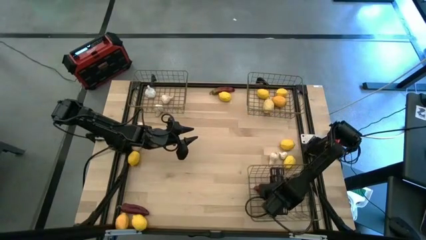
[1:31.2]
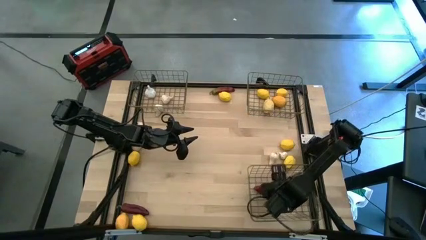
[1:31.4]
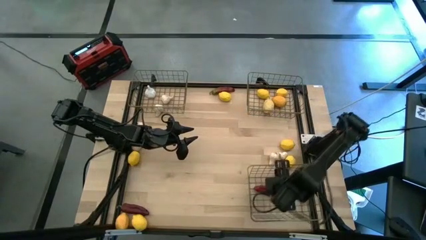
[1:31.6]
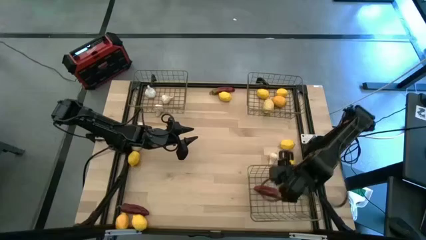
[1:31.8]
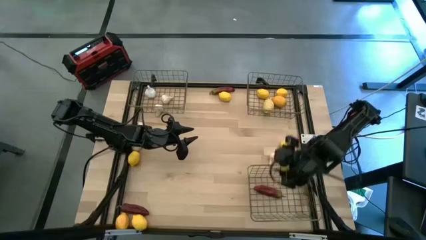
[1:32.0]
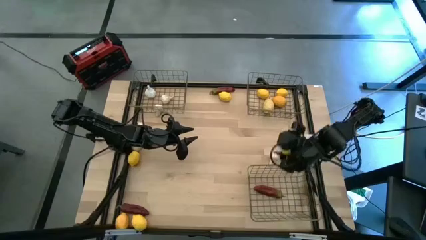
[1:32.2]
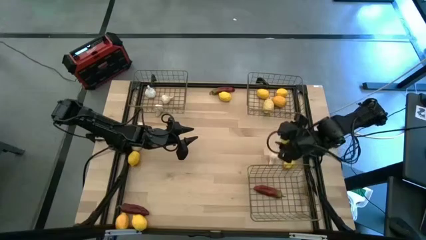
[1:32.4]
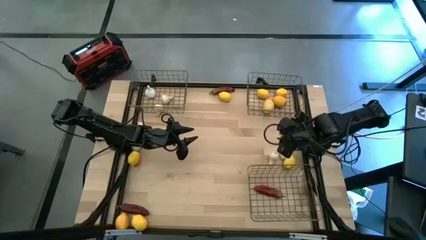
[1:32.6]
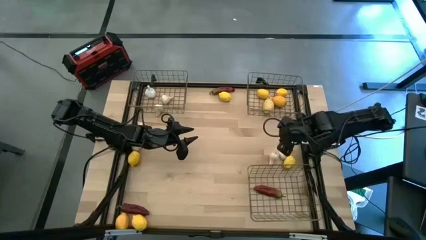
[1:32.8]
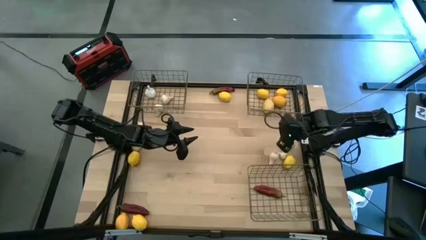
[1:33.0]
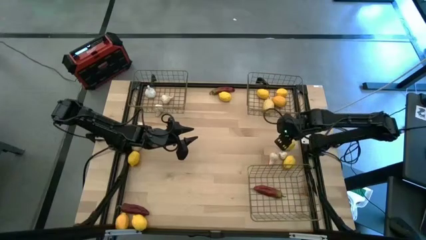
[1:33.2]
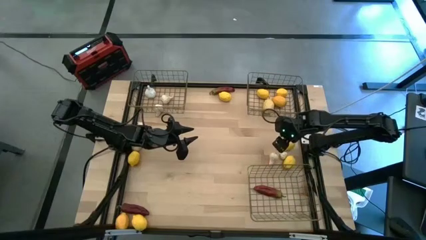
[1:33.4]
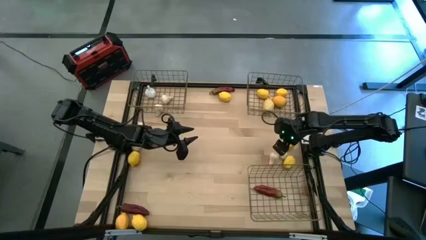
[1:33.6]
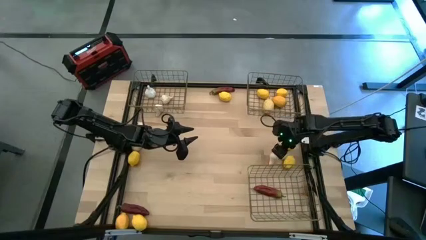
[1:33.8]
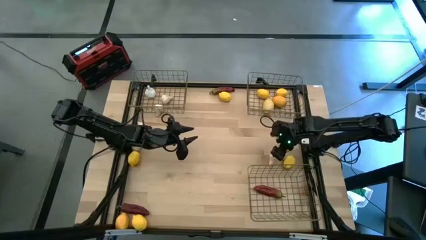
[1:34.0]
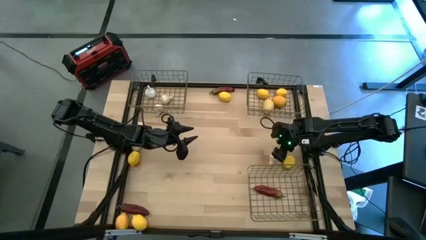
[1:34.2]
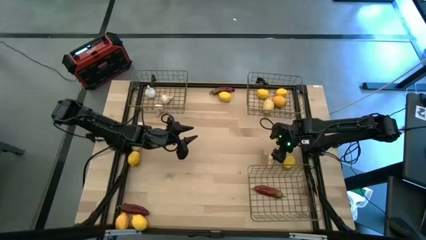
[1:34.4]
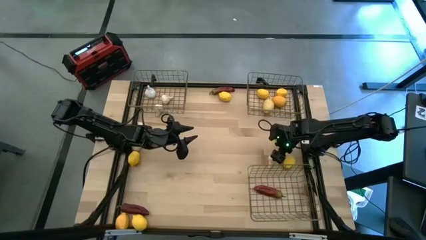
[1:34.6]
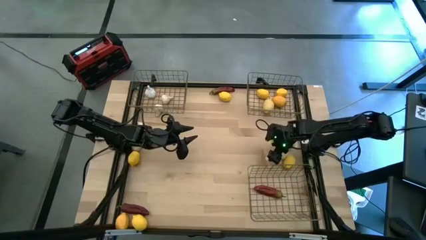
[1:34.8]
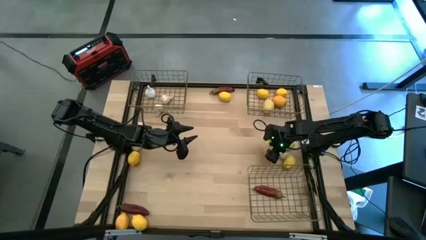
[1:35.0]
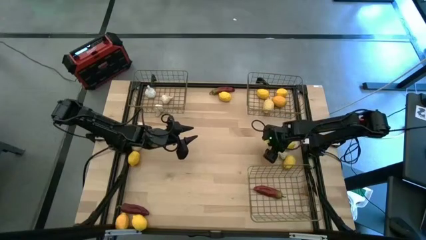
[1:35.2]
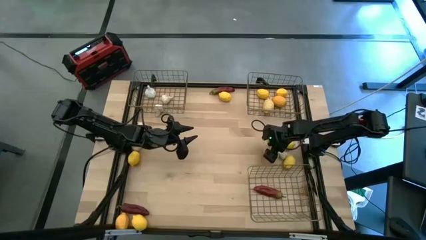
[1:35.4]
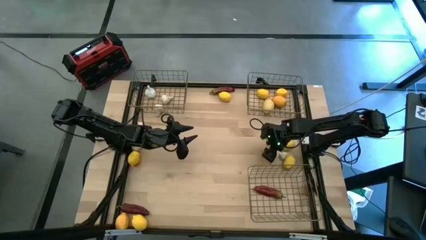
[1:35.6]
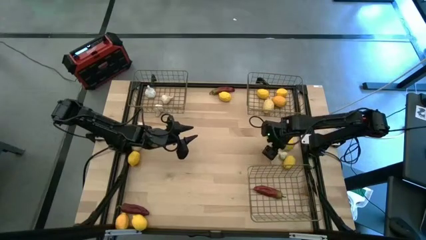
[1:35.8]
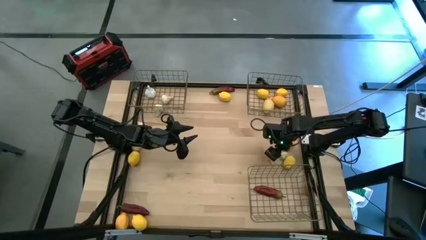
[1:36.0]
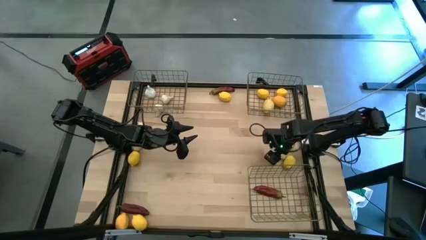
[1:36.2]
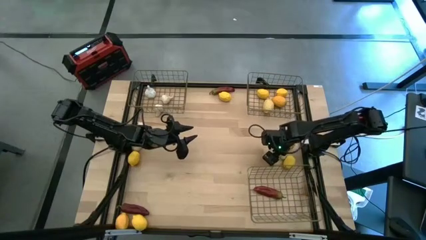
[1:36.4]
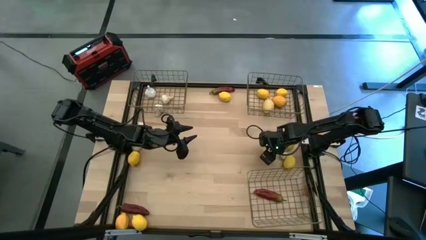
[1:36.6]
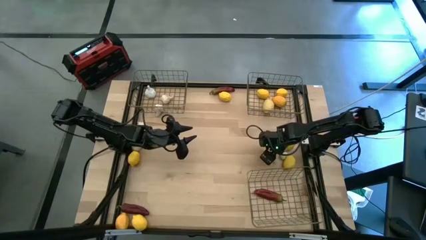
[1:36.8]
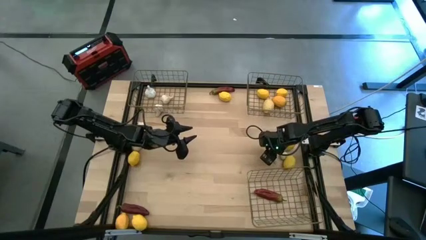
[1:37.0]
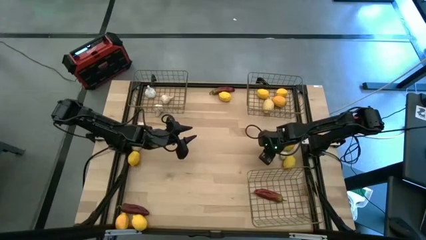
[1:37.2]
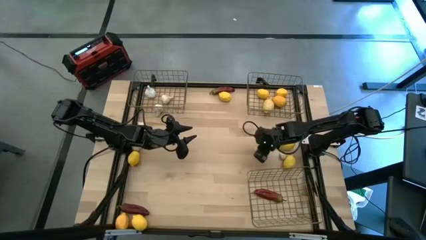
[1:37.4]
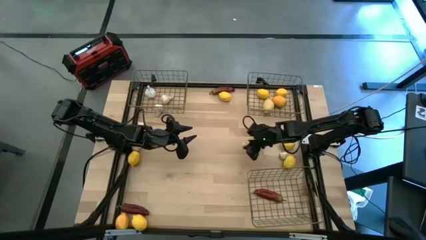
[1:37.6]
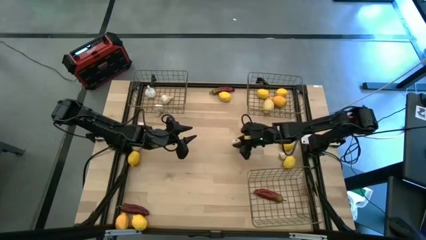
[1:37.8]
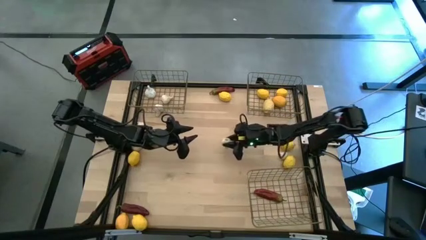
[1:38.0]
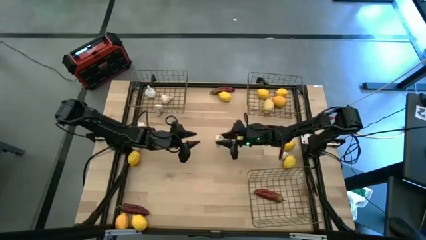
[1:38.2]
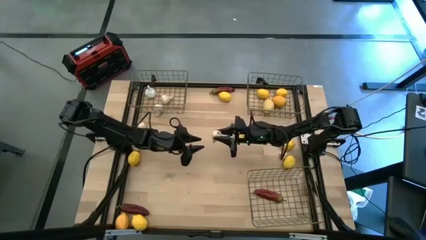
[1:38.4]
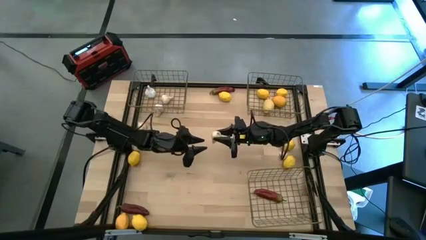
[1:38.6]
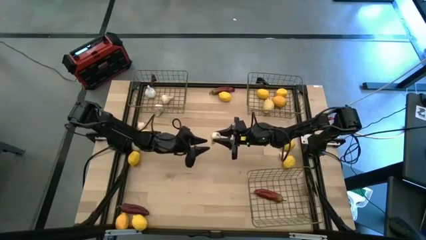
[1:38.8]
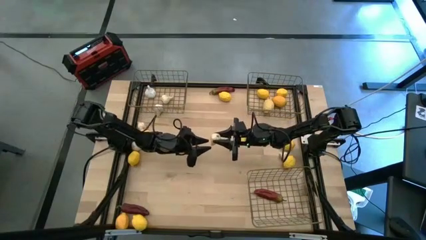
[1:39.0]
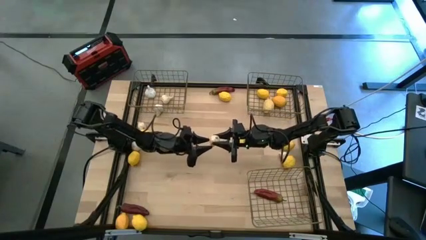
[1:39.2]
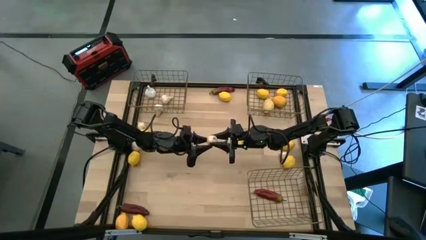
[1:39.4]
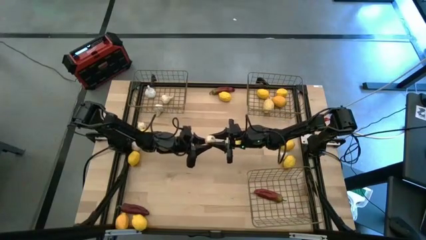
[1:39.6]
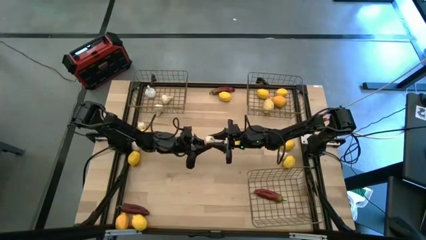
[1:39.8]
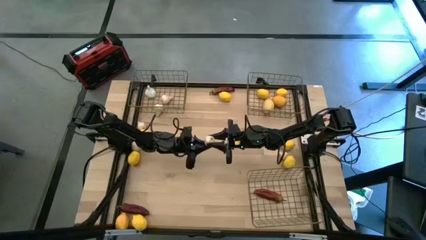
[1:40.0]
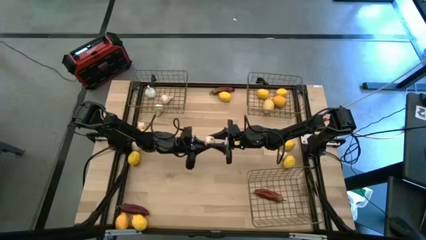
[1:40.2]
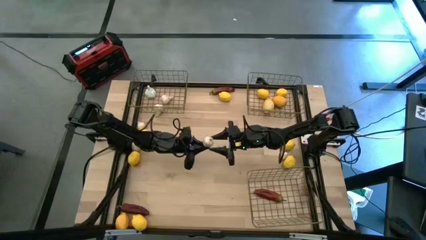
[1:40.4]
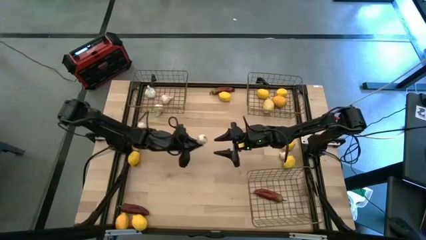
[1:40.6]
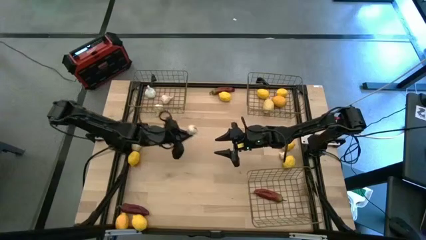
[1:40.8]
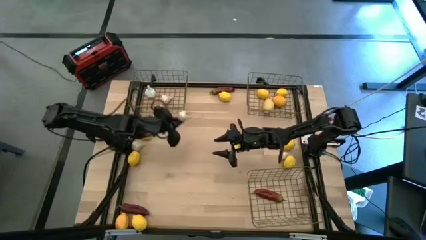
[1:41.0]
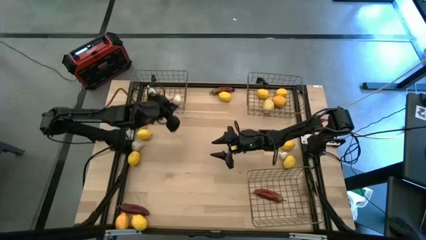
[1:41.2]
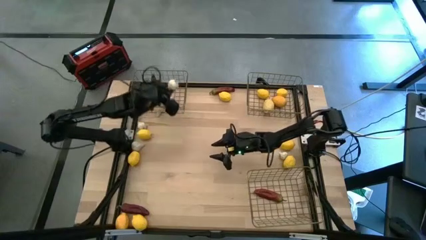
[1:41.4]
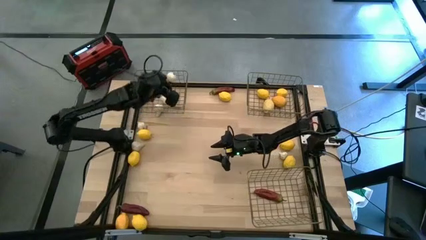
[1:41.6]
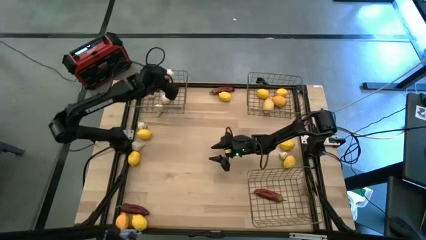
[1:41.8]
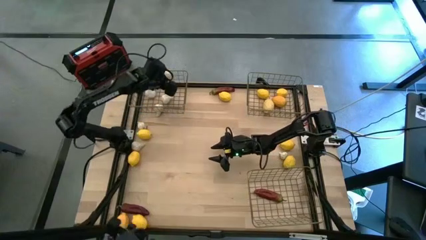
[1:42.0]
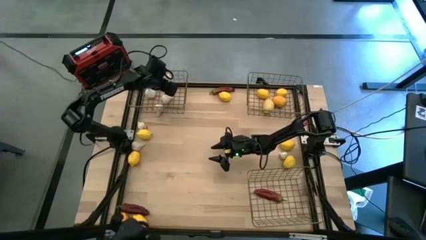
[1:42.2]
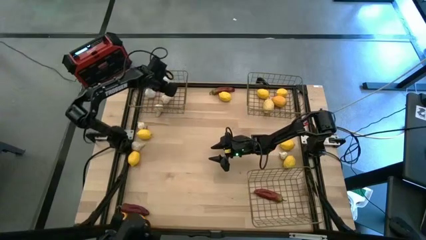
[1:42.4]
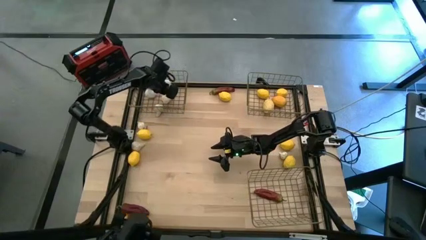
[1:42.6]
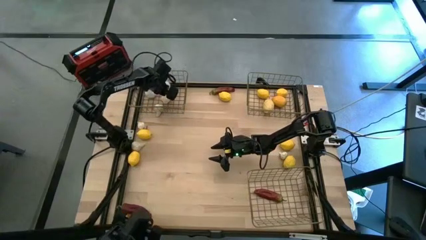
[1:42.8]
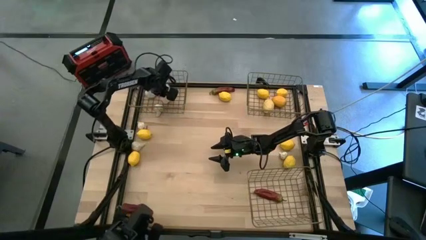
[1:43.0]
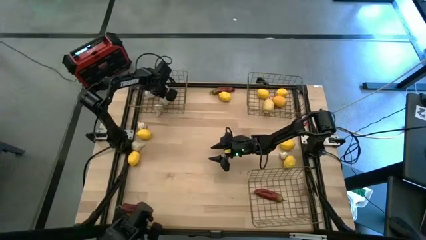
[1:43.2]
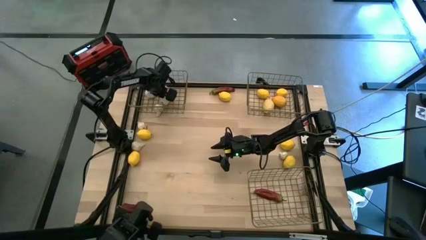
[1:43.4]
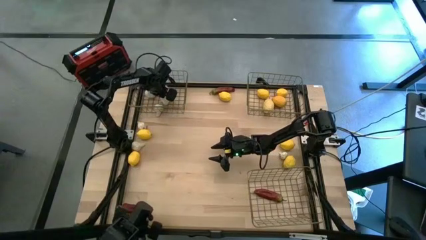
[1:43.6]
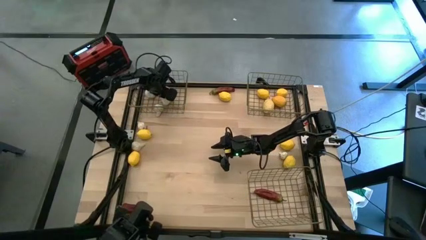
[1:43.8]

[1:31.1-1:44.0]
Task: Sort produce into baskets
Put the white garlic into the top left wire basket
